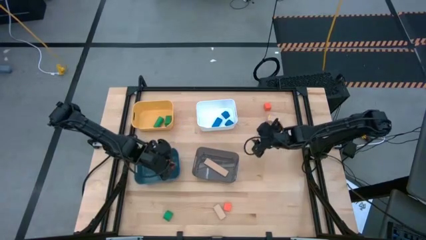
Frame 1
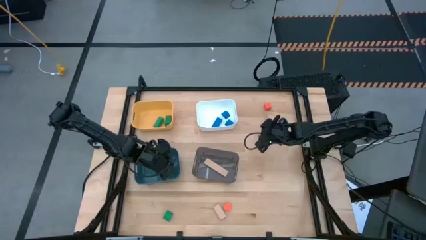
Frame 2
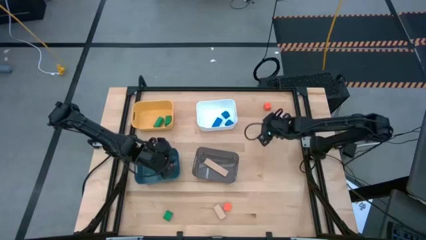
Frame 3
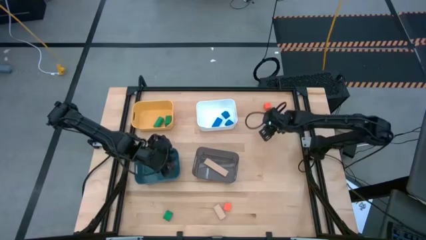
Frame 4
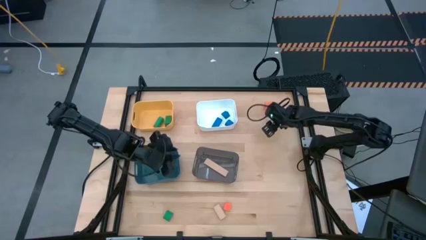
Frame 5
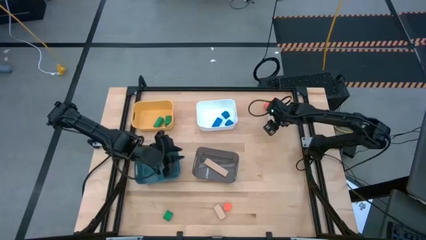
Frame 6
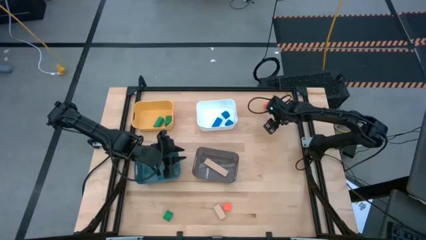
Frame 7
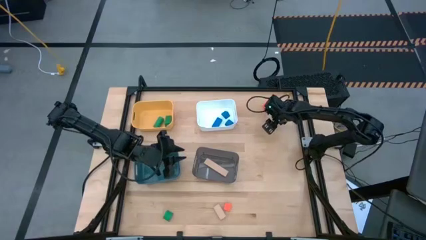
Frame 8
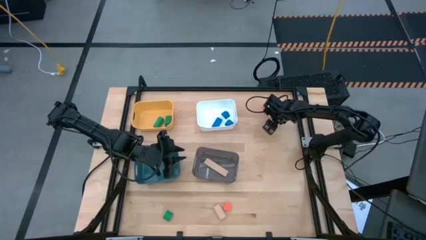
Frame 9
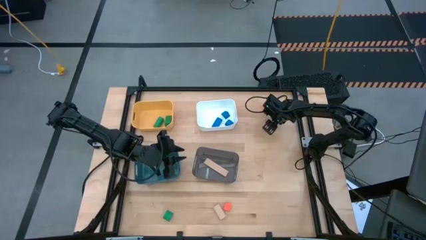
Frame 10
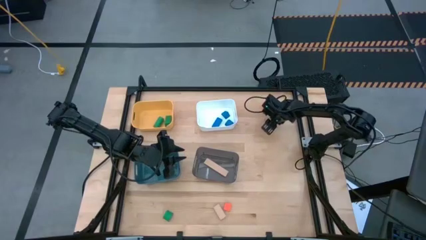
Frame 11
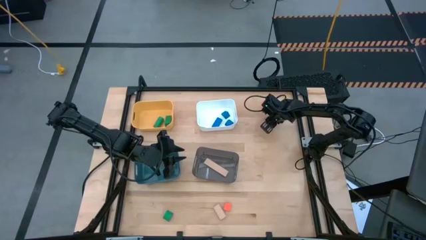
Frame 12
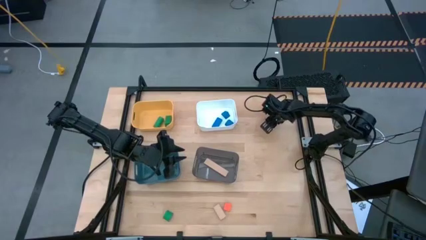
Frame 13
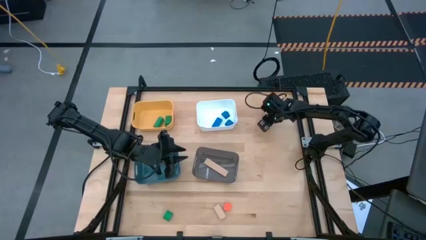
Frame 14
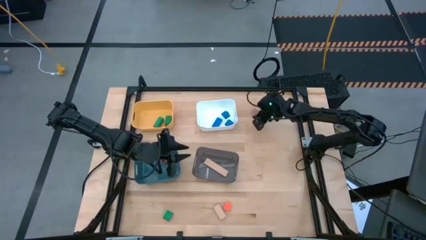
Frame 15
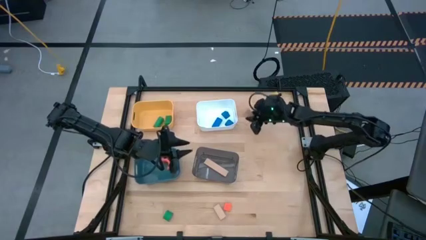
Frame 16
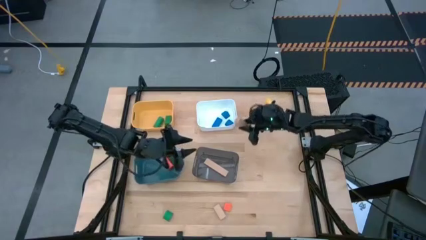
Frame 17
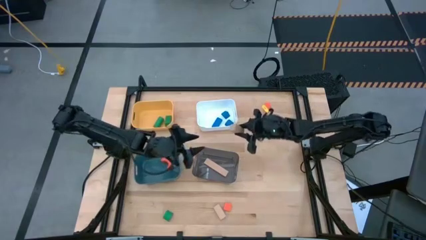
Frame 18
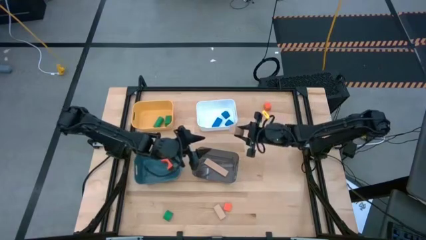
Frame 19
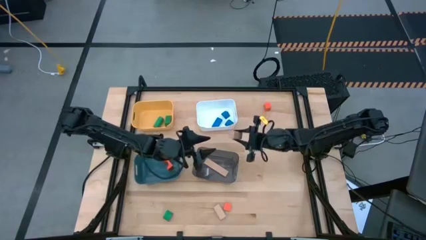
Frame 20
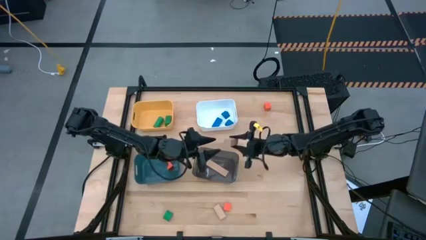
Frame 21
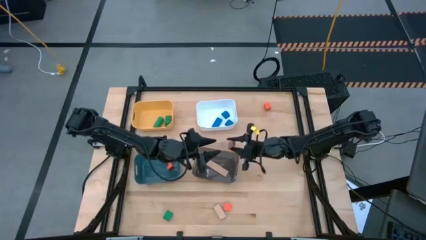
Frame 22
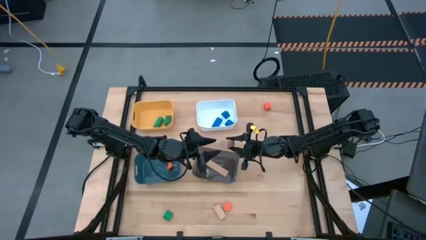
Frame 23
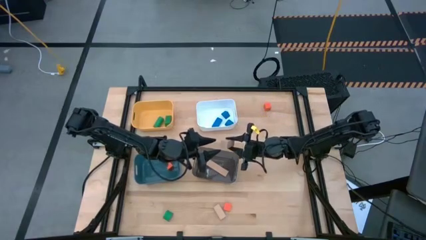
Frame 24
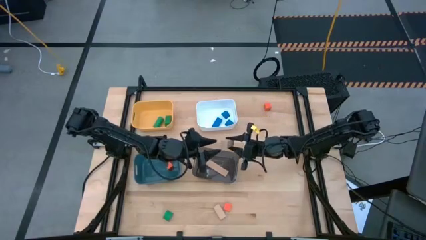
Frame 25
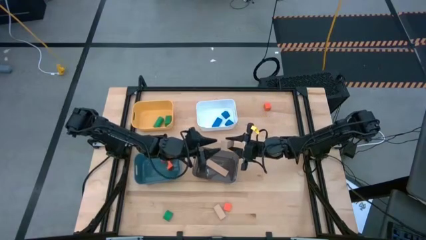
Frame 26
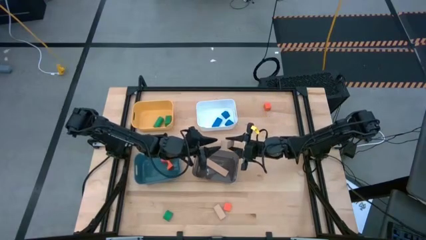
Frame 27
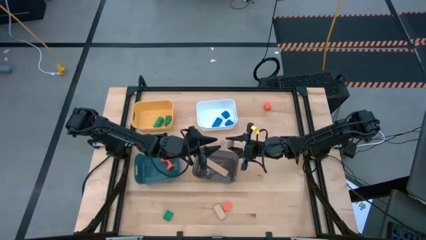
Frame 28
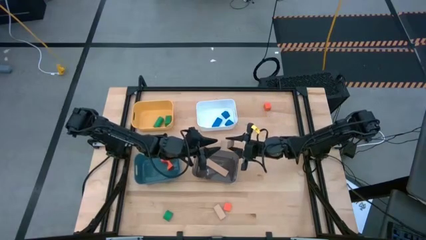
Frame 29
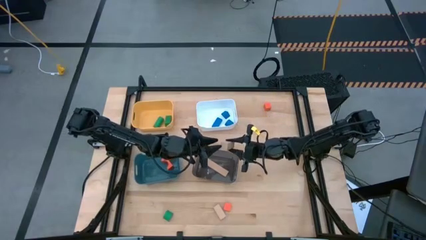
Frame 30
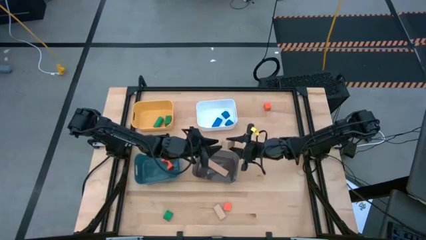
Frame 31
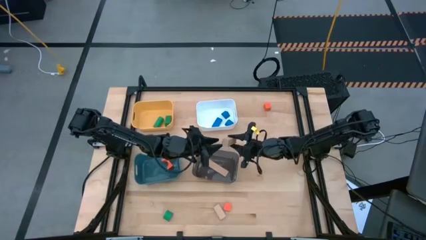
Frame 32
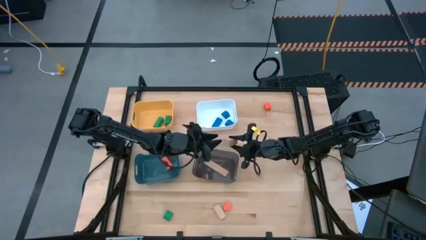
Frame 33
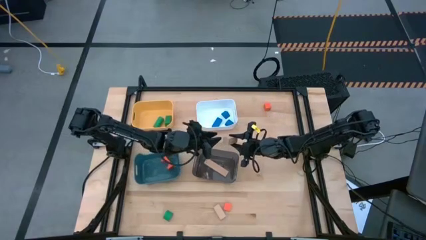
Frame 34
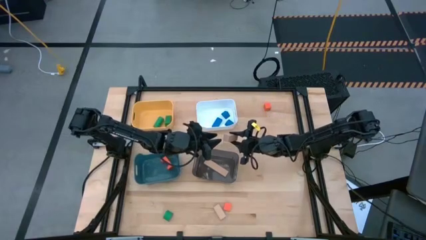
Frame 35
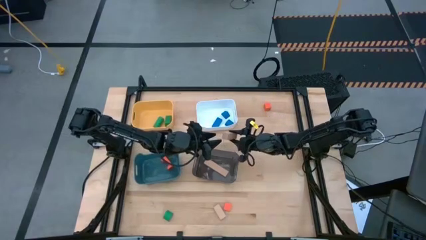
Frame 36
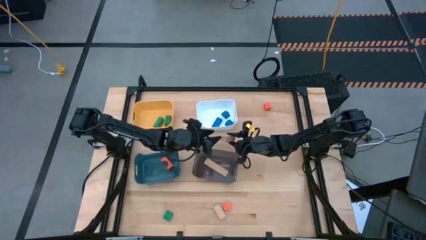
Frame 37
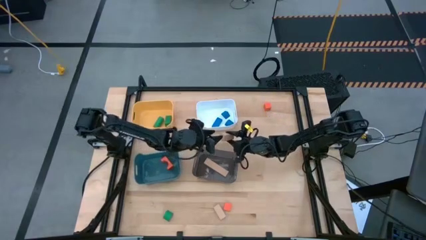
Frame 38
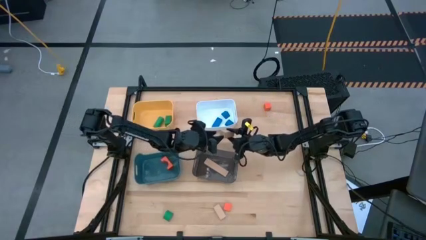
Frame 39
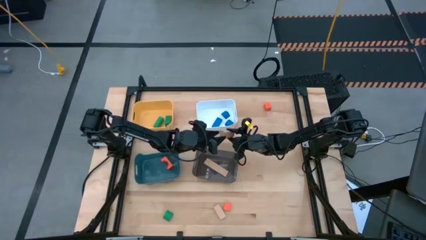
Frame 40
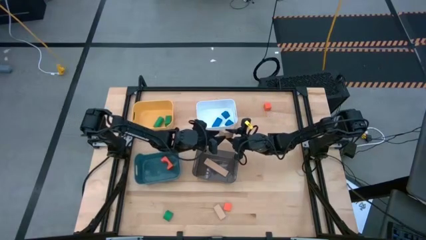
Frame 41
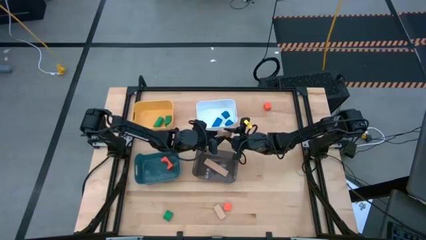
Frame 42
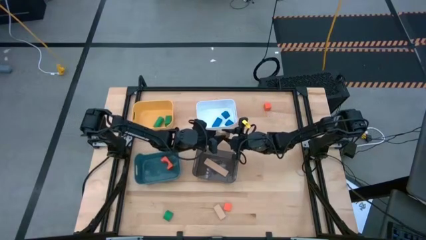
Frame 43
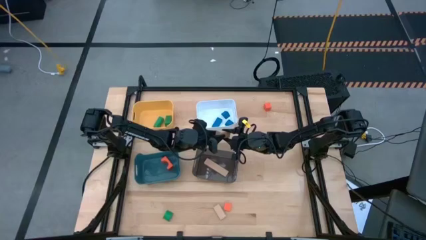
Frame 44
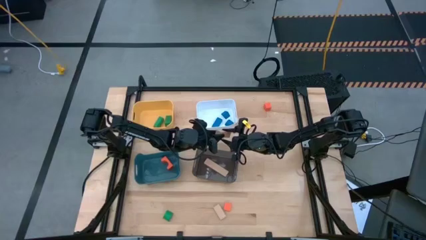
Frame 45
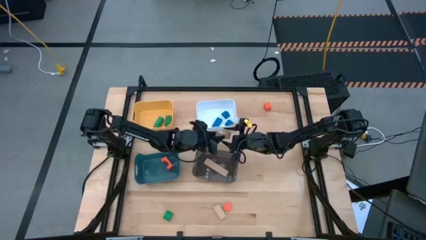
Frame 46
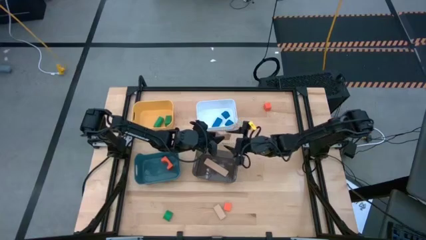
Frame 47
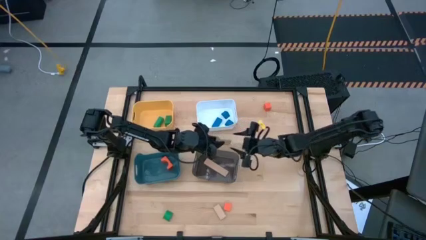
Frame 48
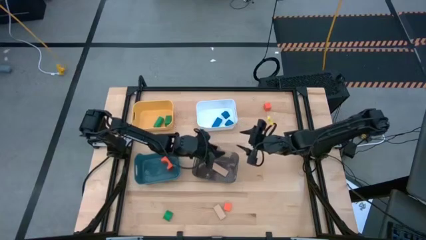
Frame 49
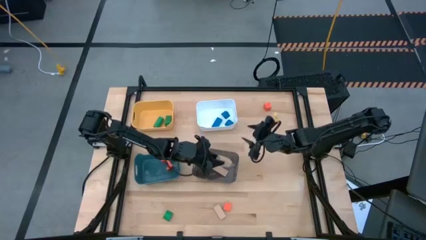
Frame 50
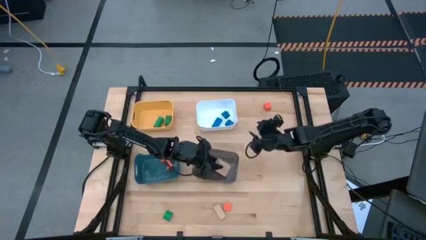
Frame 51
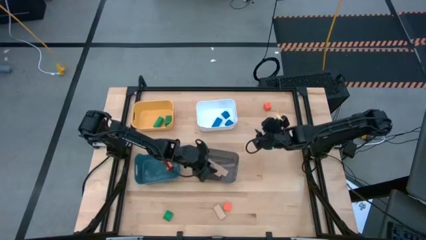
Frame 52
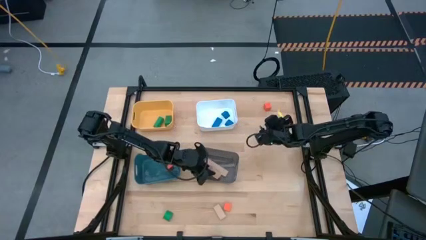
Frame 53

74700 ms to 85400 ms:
Task: Sort & place blocks by color
Put the top brown block into the black bin

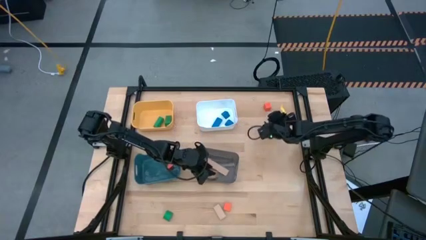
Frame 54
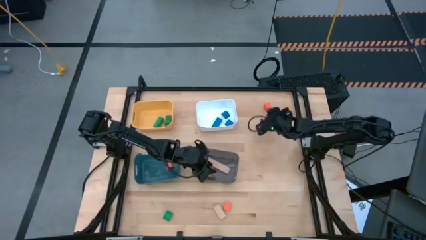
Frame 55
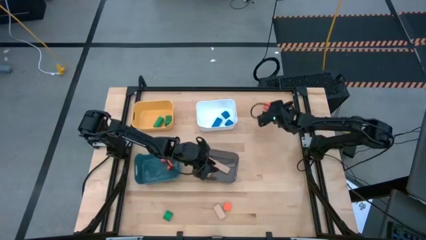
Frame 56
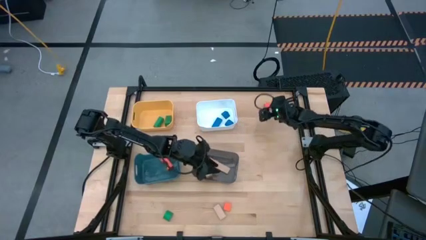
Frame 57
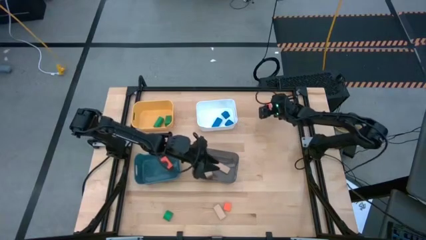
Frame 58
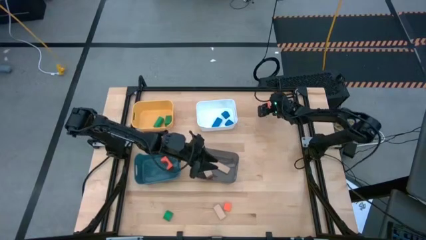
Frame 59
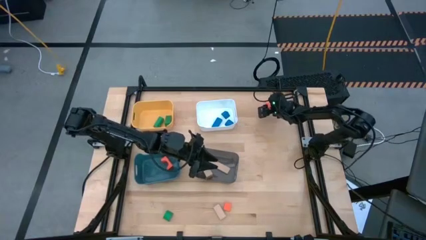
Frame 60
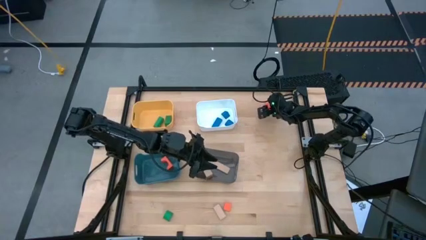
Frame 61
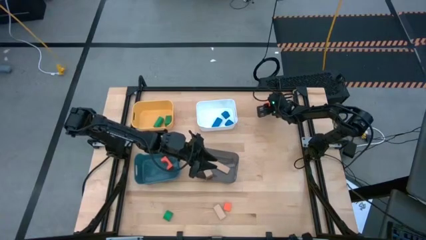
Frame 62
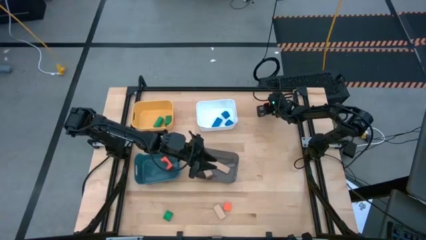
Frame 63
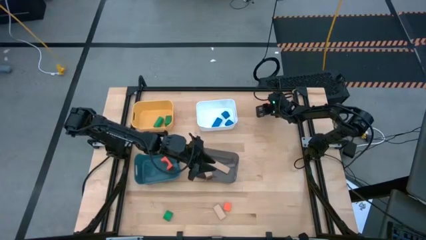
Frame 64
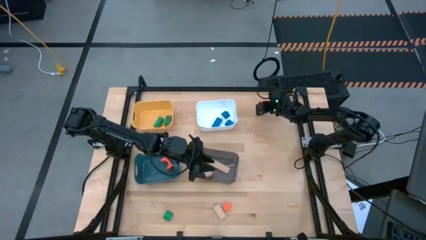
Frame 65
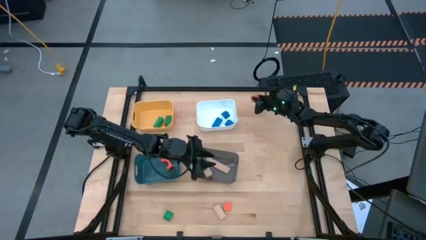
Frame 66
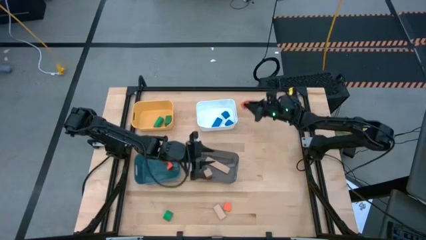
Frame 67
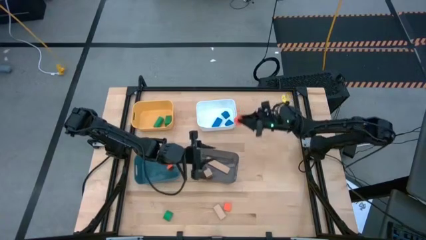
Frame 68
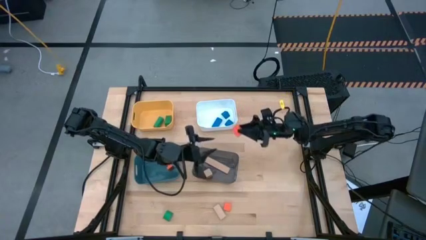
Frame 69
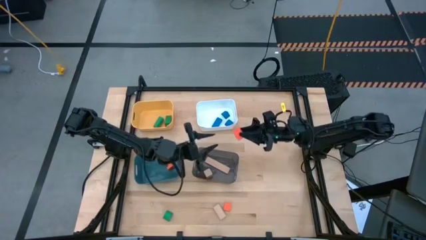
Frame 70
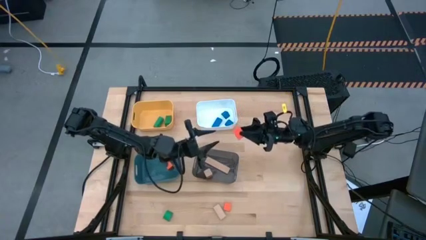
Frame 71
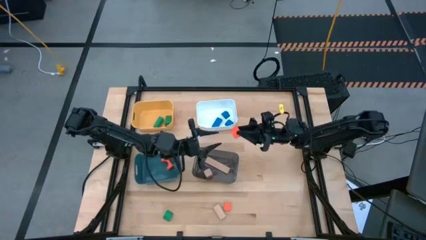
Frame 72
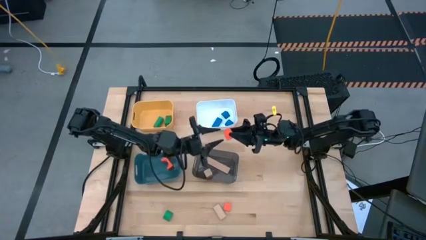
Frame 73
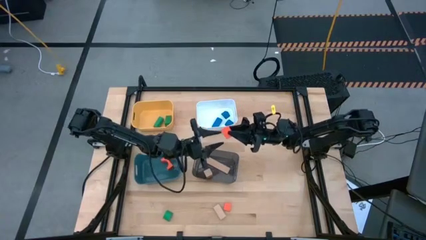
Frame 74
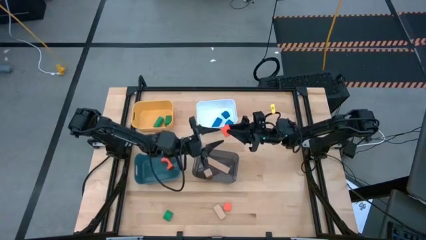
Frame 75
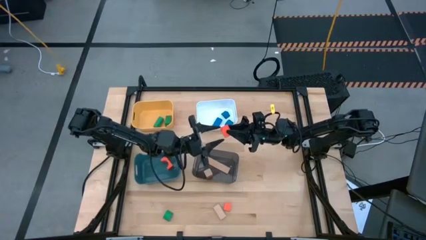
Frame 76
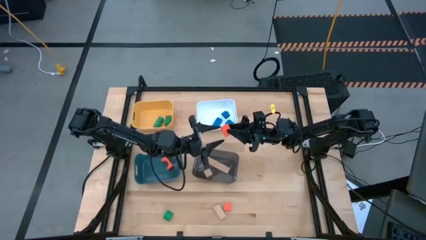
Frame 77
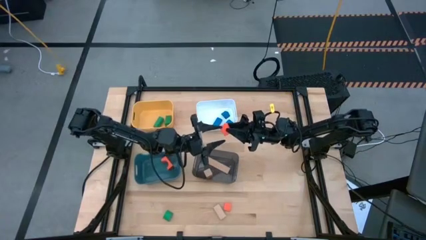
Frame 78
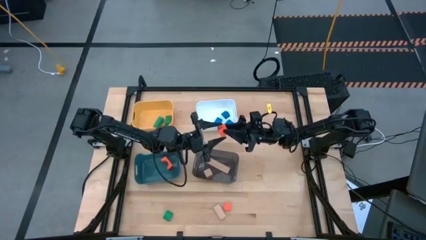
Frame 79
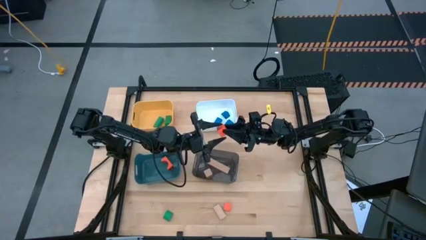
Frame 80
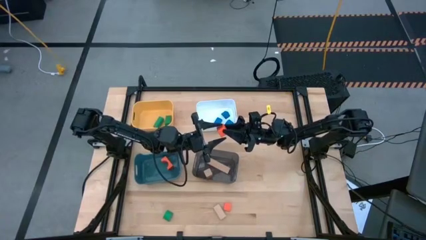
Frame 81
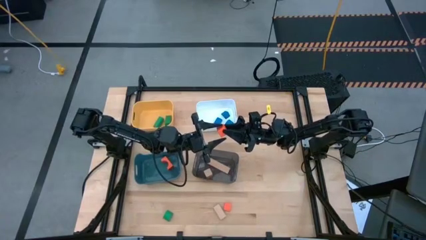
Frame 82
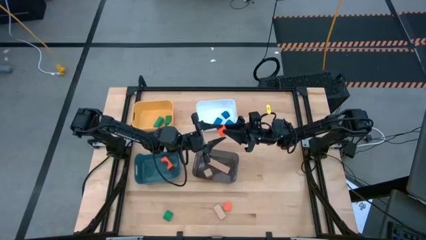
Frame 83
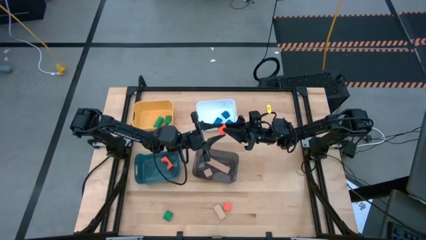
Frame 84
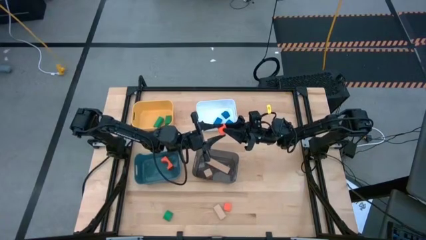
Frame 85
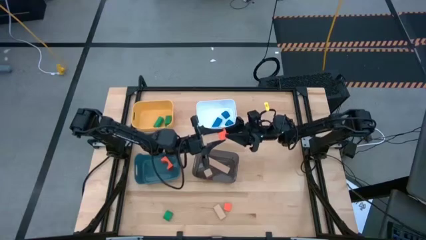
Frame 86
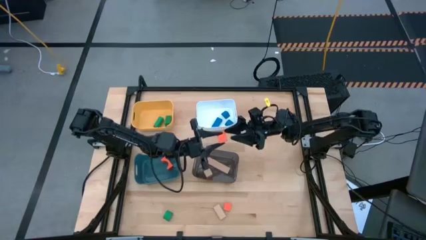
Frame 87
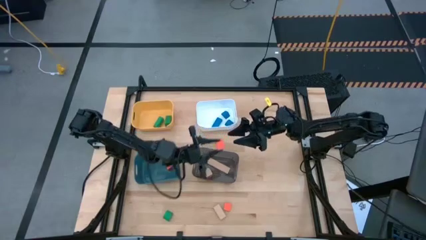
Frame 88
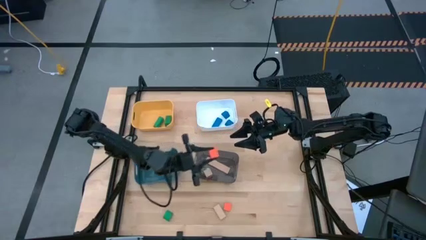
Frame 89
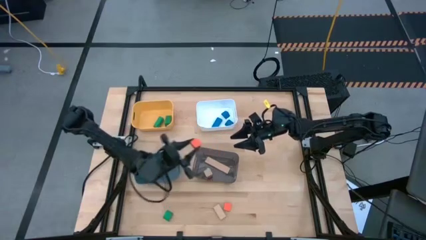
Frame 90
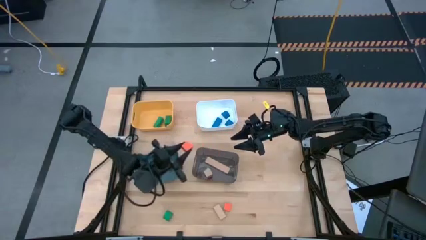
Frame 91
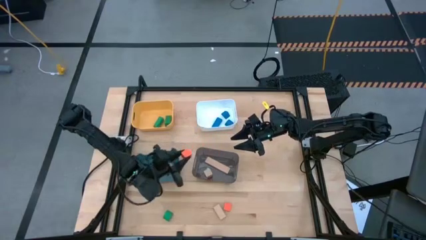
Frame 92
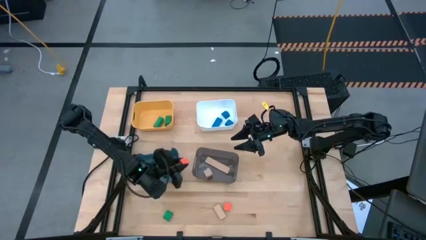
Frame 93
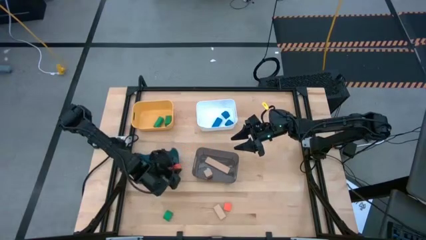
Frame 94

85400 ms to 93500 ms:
Put the top orange block into the blue bin
